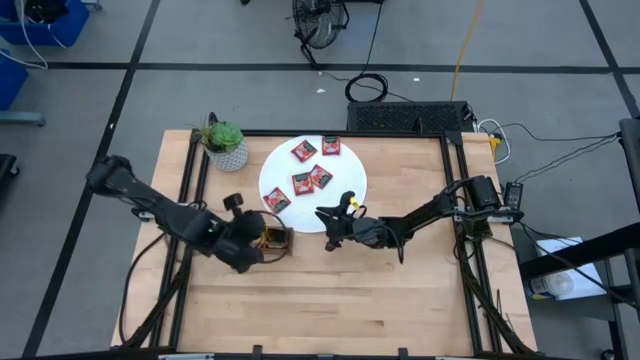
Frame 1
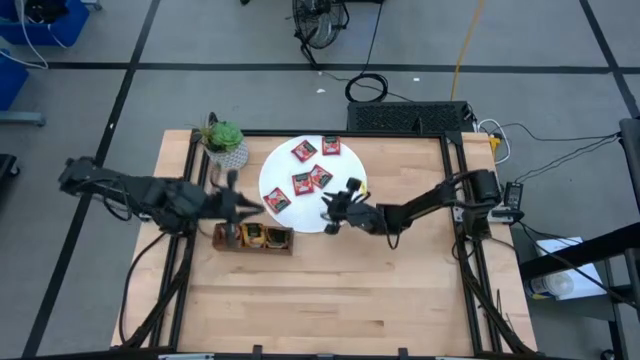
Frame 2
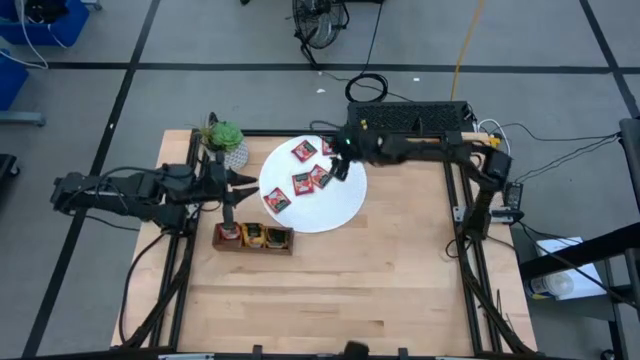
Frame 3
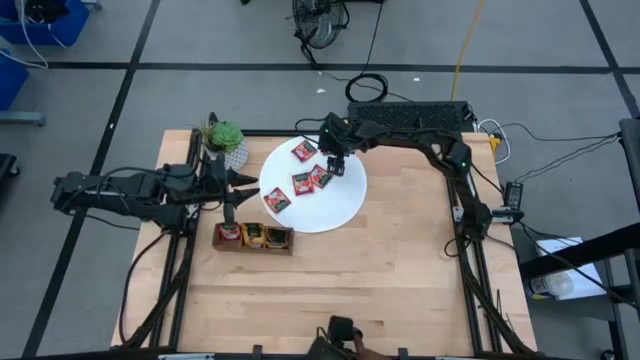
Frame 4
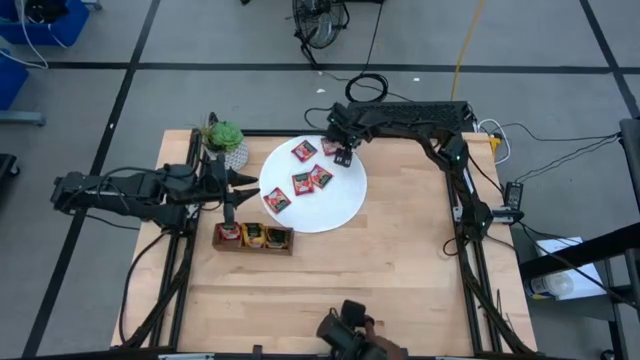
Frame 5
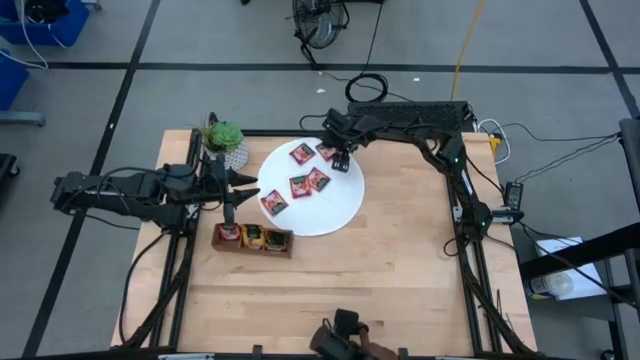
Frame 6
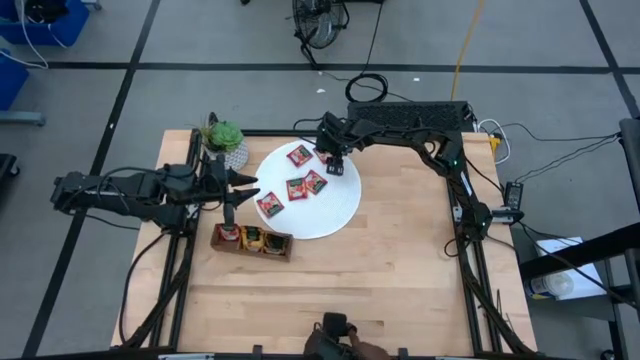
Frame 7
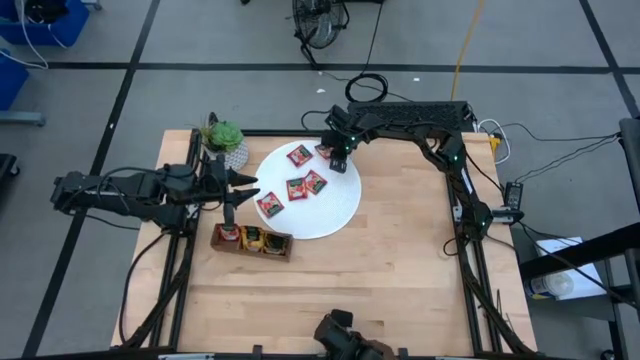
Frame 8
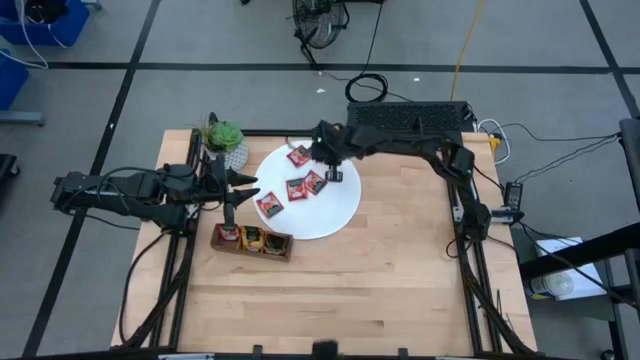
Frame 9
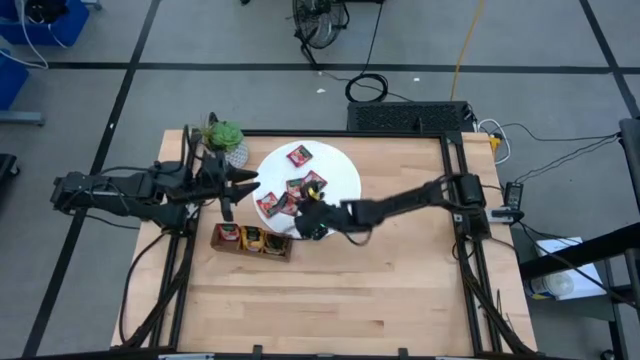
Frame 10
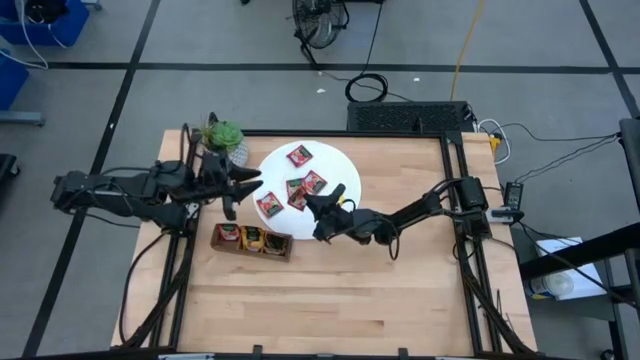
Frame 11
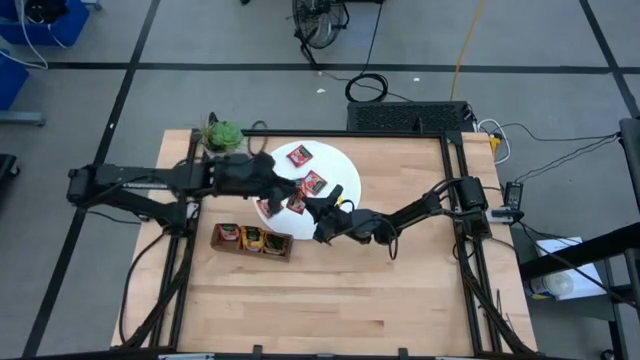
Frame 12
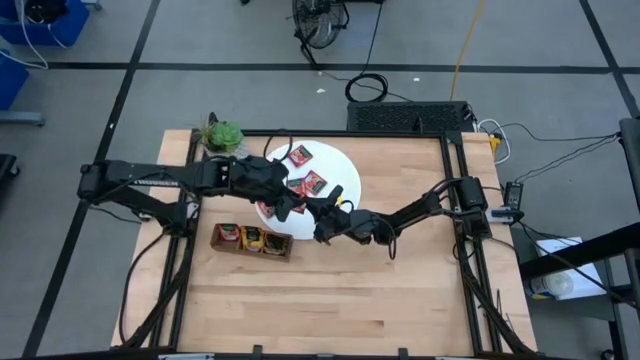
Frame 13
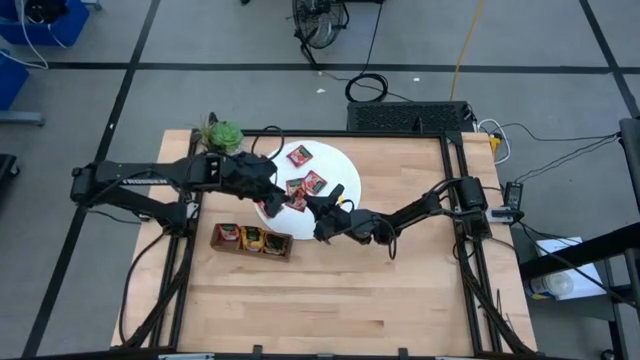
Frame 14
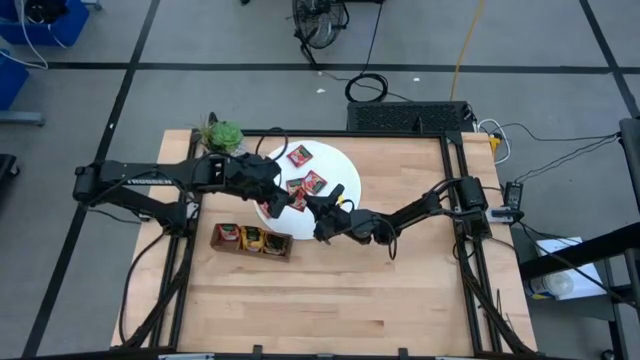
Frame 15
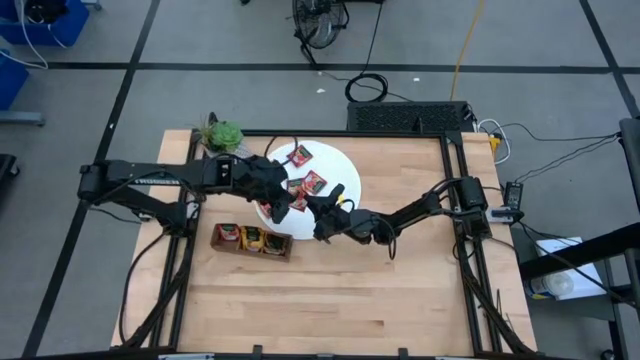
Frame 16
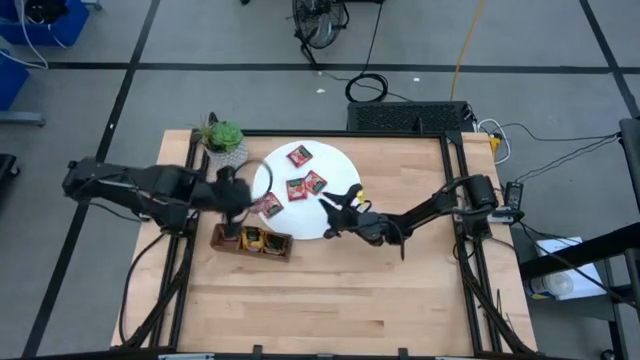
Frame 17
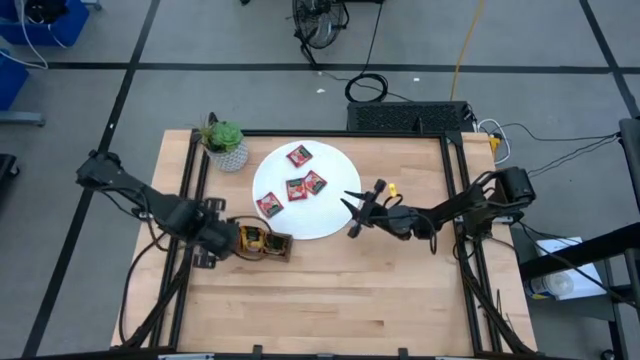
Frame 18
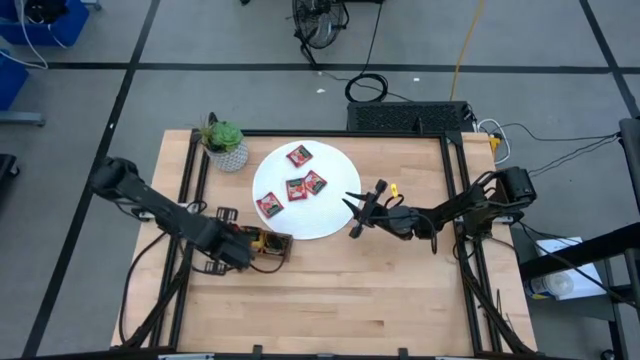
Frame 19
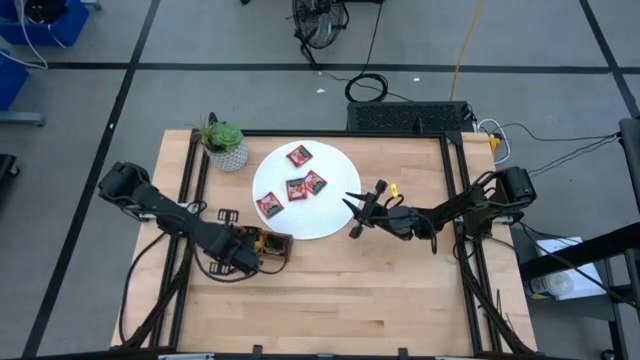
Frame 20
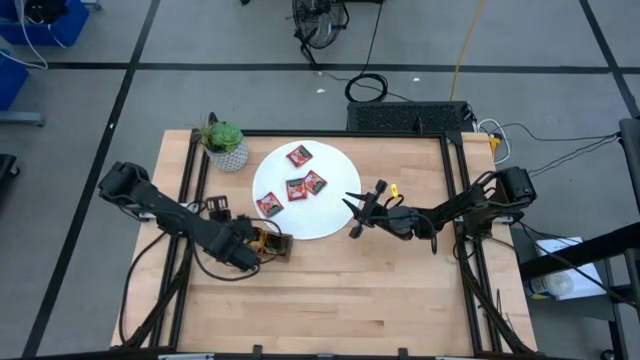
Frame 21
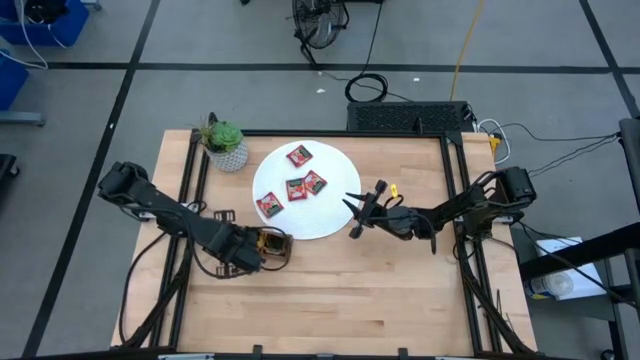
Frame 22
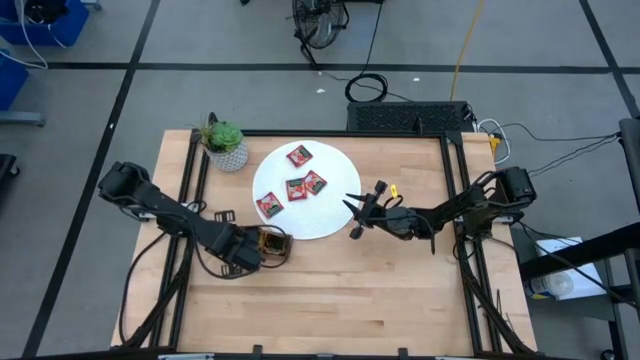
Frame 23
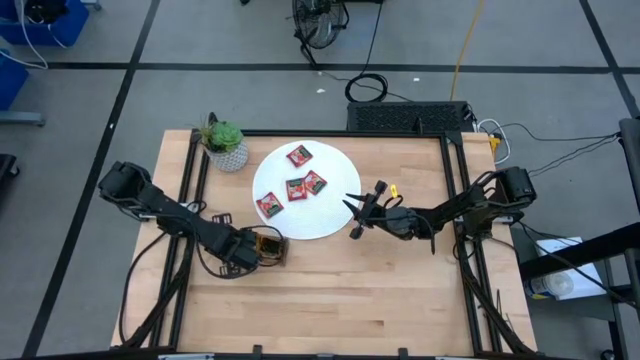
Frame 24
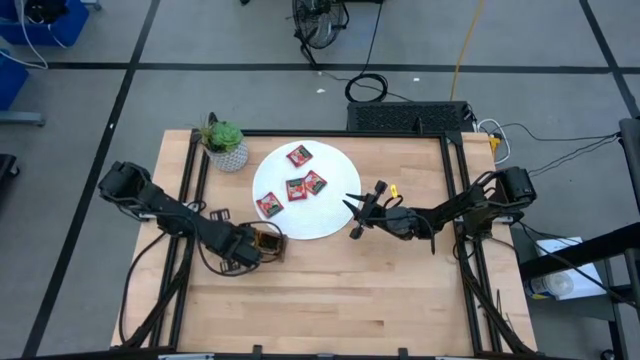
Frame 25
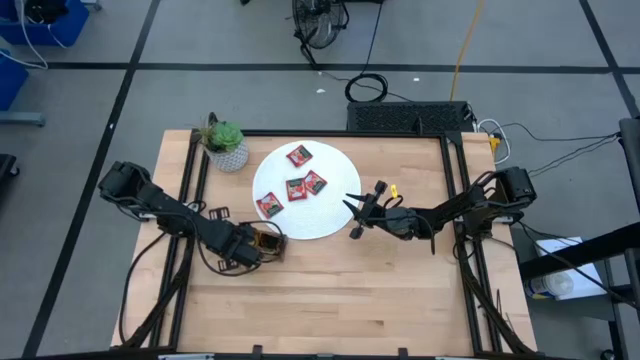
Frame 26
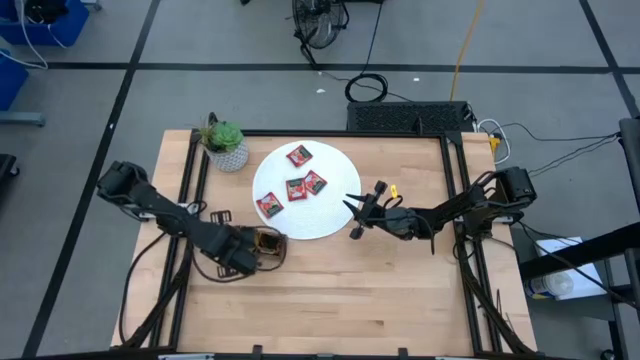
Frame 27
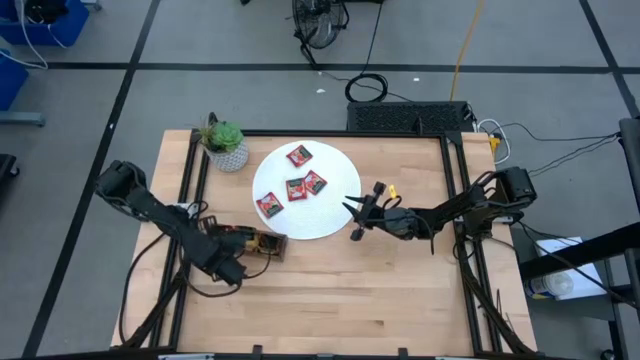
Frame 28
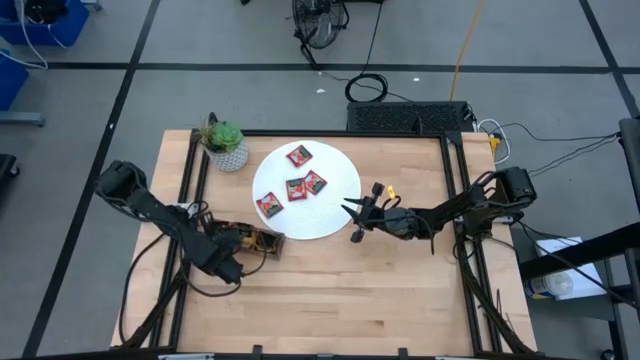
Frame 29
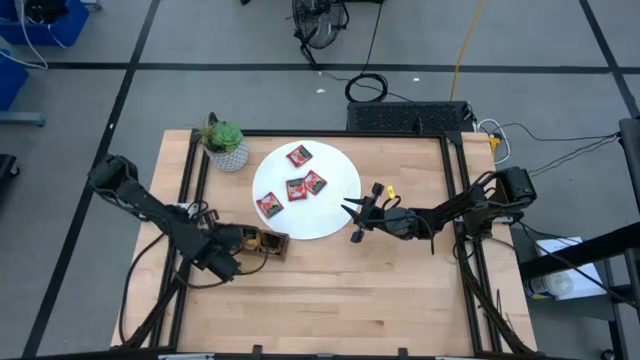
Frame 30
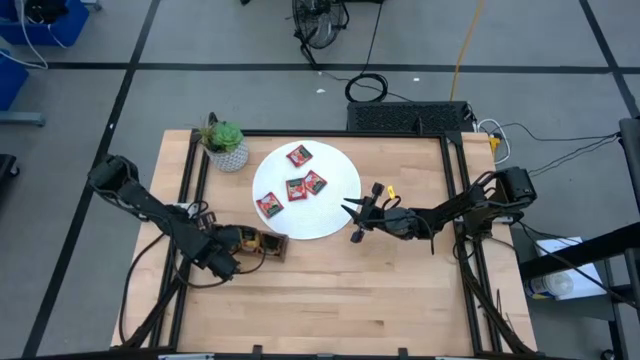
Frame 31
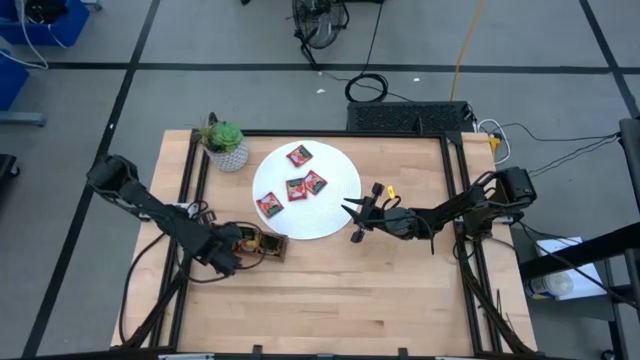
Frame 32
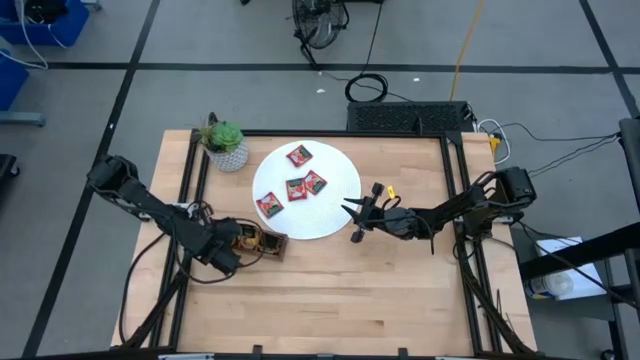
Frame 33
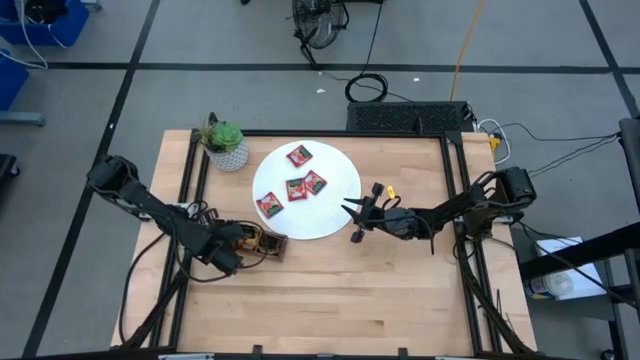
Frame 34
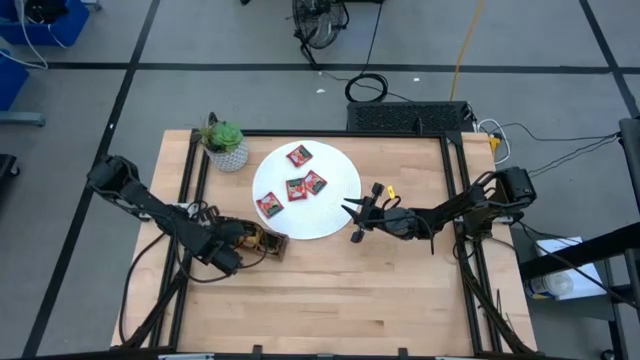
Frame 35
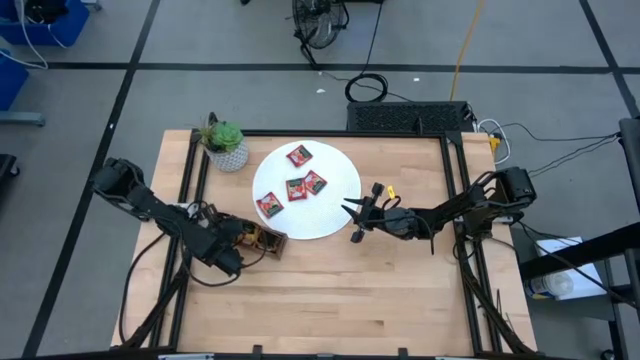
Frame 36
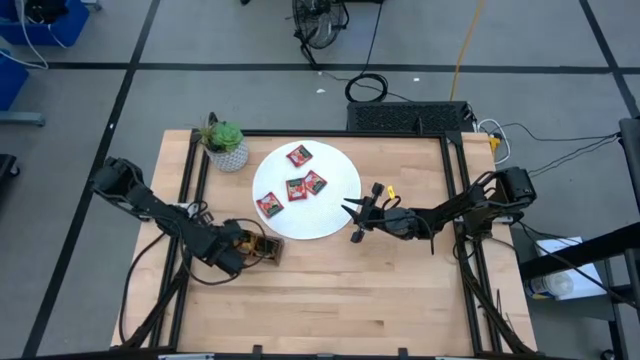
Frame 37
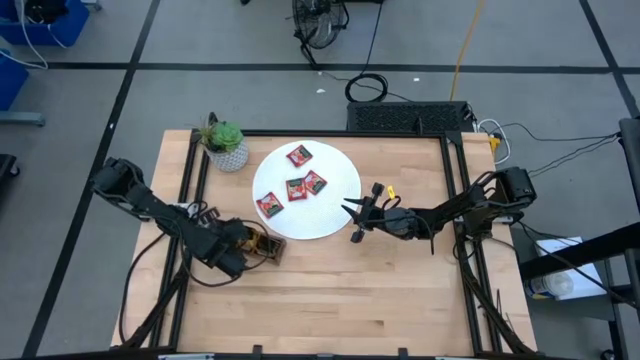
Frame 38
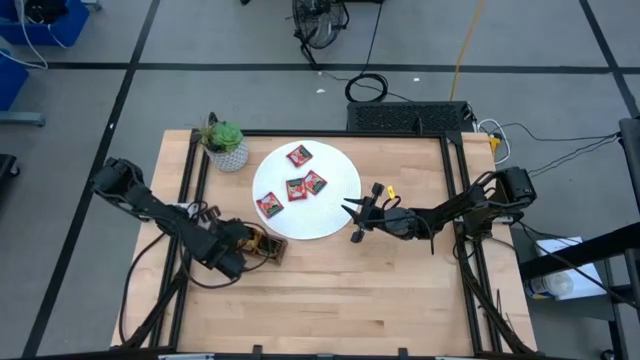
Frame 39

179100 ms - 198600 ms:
Task: Pick & Place Tea
Put the red tea bag into the left section of the wooden organizer
